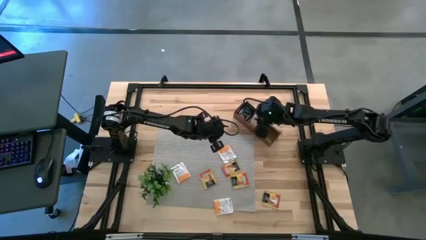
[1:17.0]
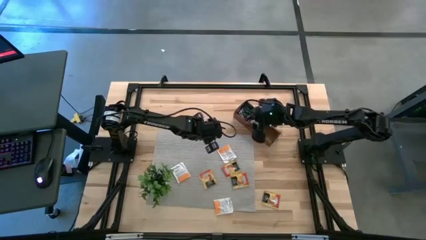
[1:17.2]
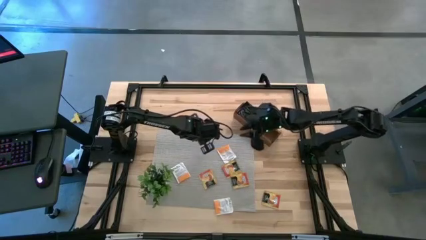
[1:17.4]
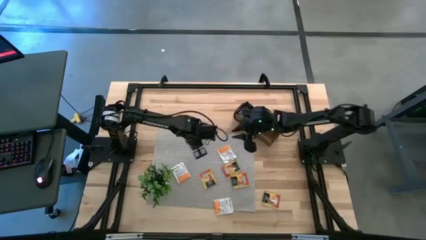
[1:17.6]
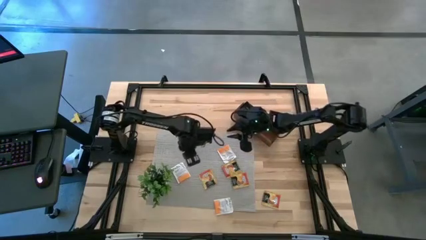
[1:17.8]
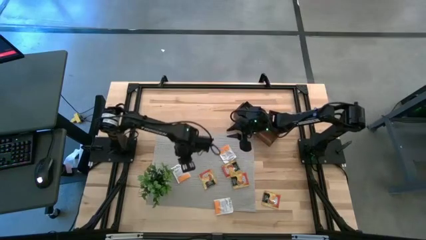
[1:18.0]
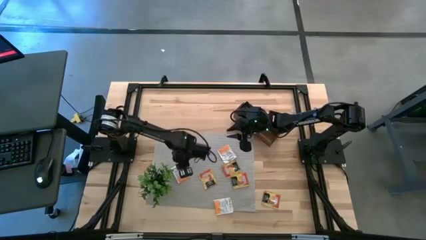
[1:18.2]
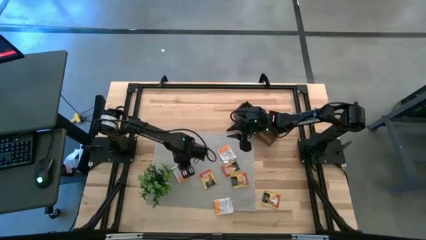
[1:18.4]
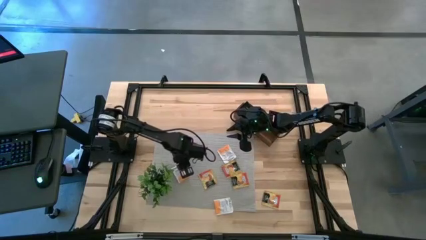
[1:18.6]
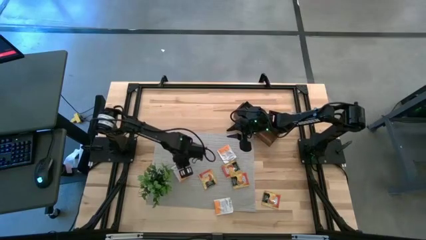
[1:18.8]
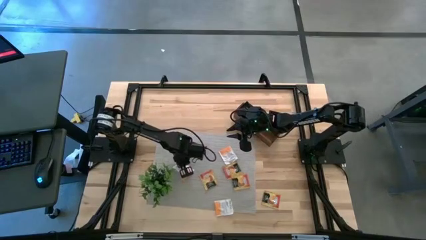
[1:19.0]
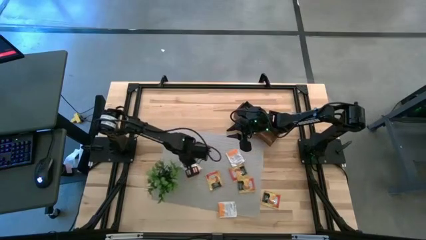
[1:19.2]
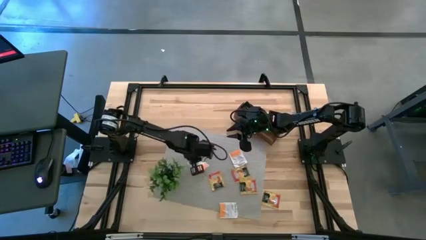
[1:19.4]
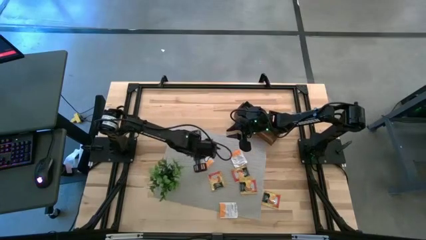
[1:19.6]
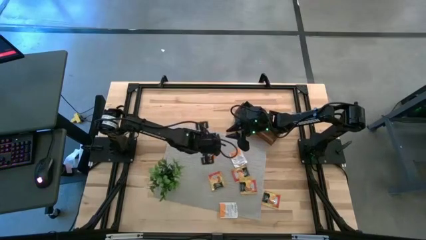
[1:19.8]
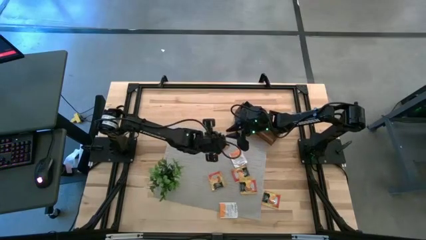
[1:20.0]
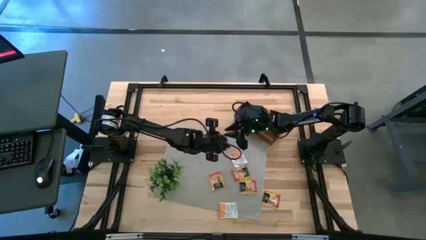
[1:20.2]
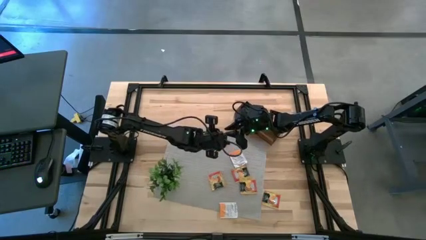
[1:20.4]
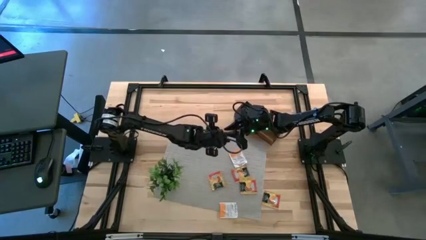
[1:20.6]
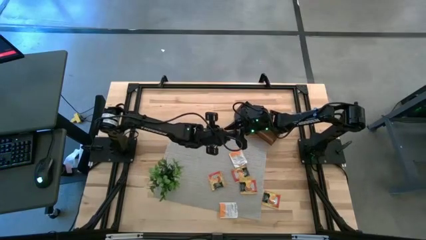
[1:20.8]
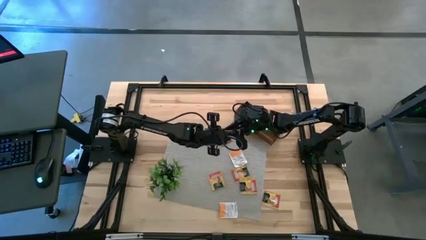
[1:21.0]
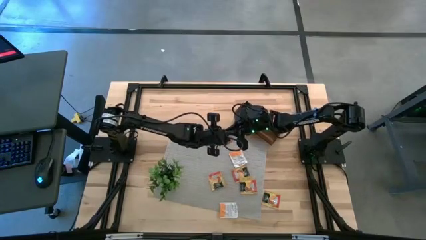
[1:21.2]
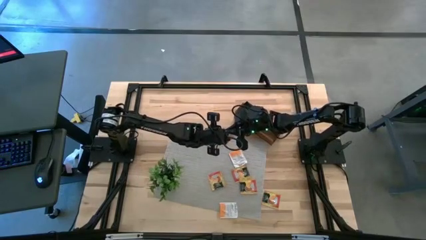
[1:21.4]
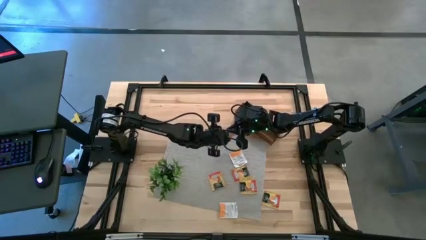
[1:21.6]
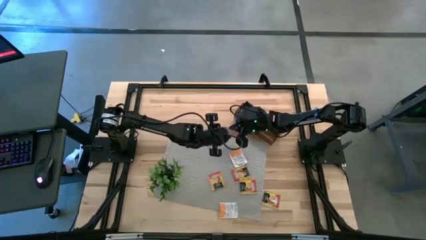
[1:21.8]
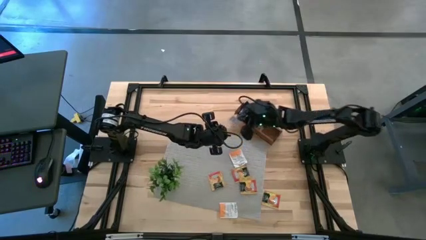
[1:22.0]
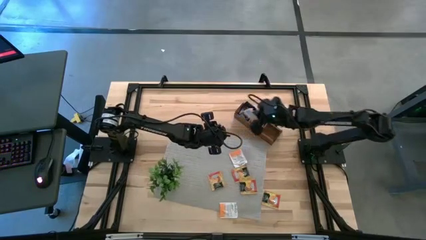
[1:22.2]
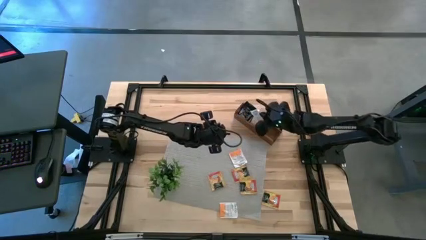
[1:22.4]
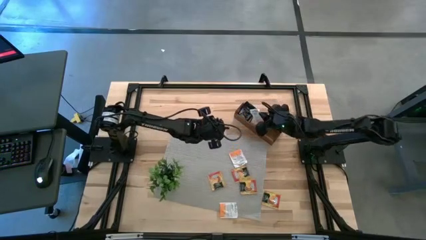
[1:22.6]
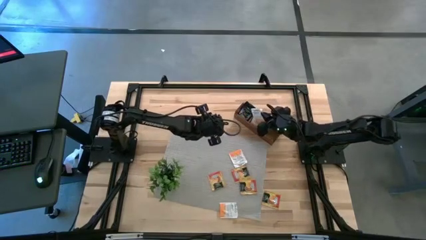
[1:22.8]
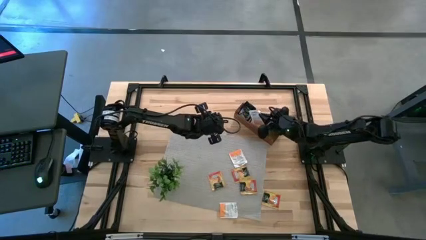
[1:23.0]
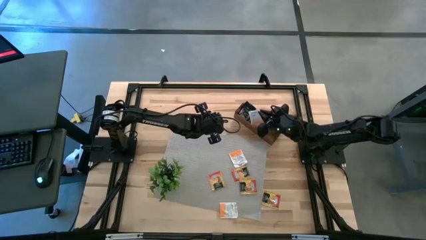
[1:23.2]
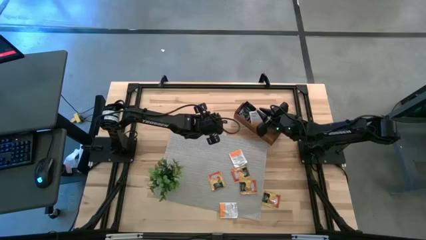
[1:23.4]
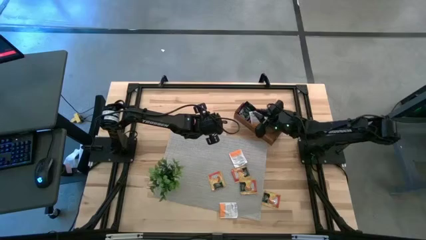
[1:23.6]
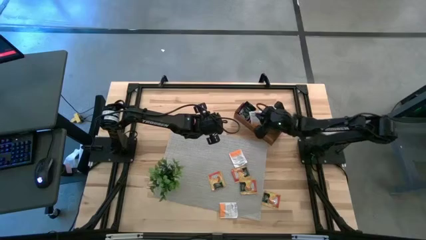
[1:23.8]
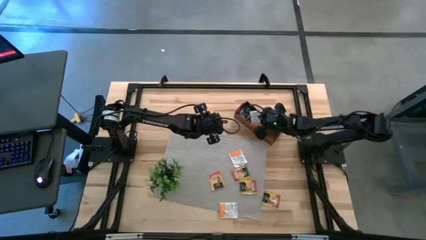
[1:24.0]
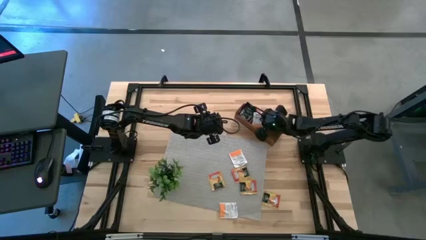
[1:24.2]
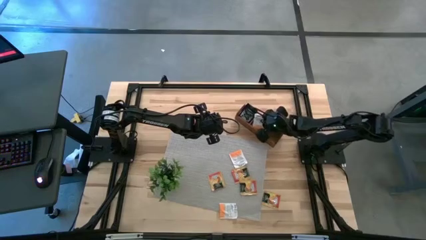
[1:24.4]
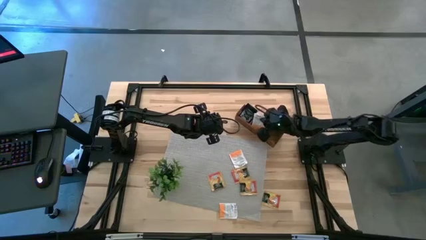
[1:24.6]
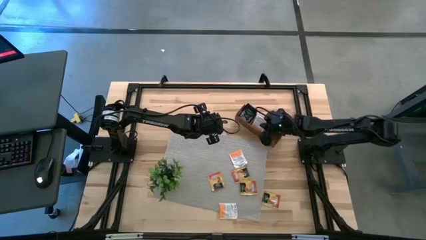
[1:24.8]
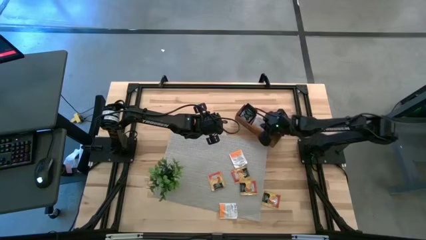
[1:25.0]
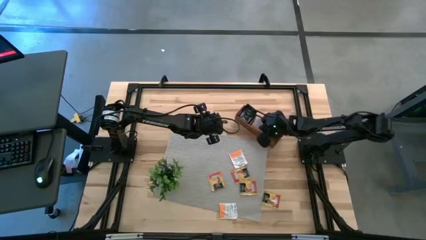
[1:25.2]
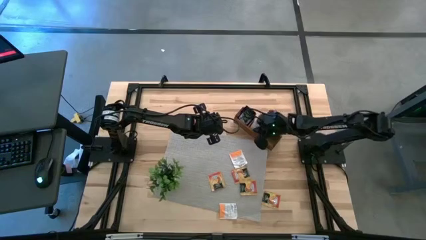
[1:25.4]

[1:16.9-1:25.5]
Task: Pick & Place Tea
Put the orange tea bag into the middle section of the wooden organizer

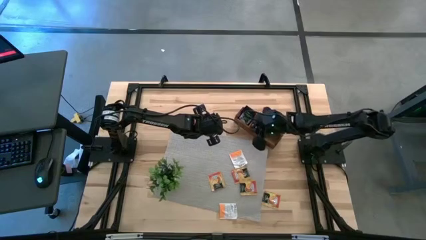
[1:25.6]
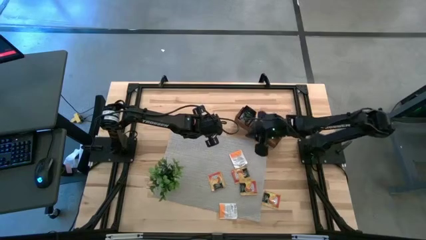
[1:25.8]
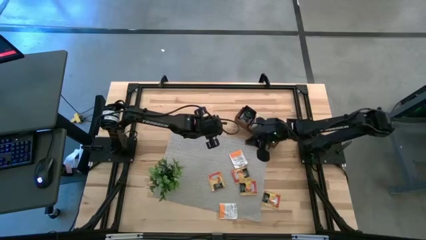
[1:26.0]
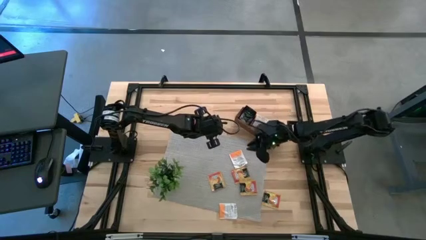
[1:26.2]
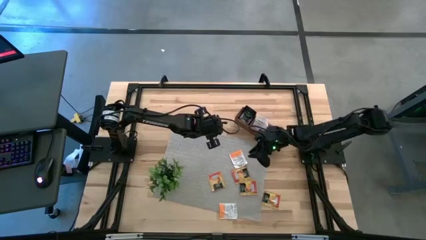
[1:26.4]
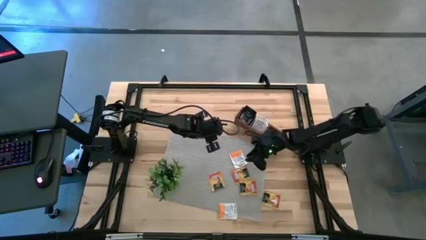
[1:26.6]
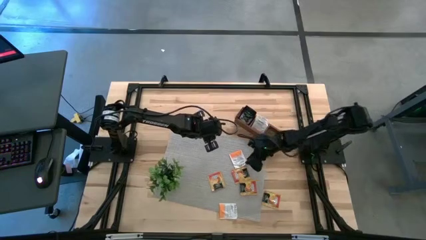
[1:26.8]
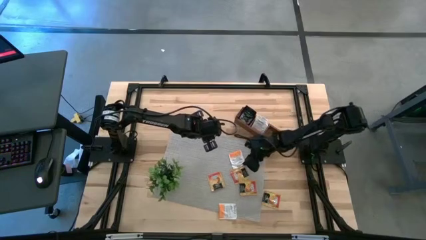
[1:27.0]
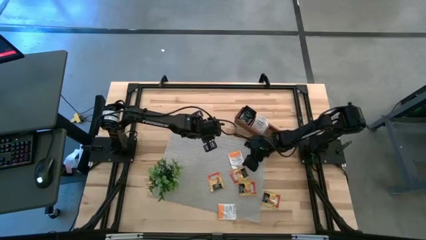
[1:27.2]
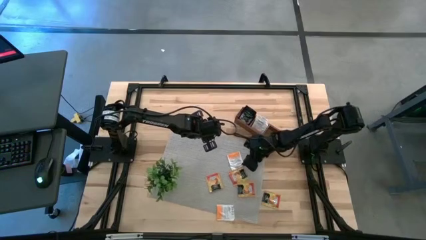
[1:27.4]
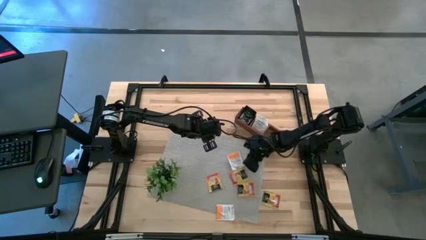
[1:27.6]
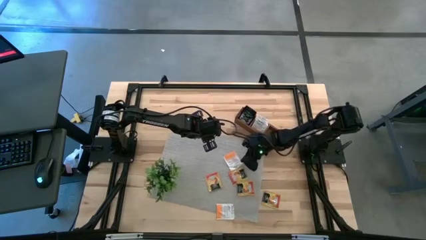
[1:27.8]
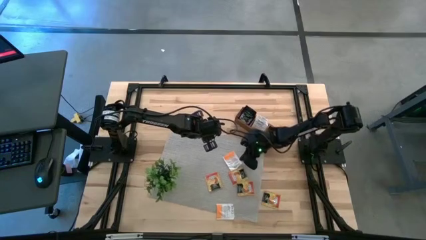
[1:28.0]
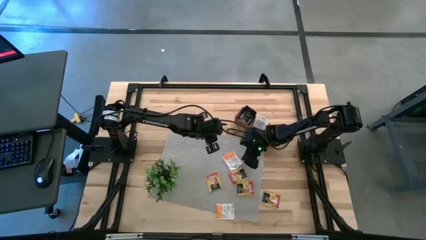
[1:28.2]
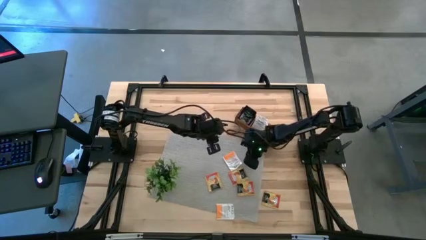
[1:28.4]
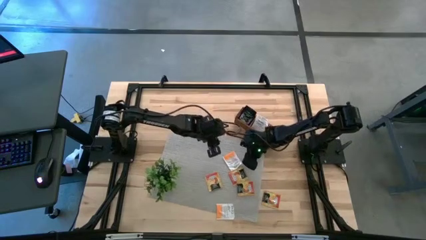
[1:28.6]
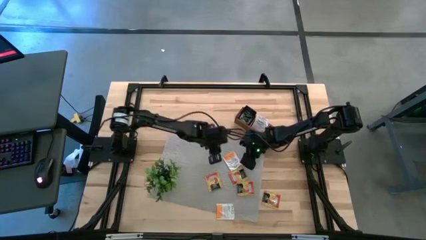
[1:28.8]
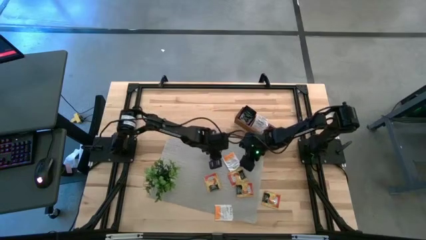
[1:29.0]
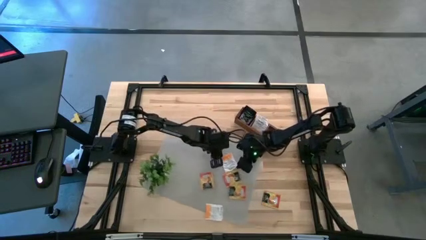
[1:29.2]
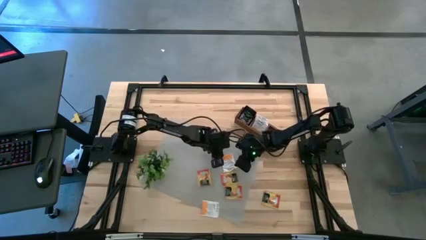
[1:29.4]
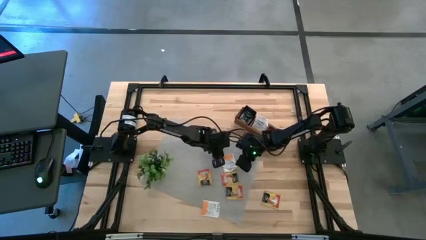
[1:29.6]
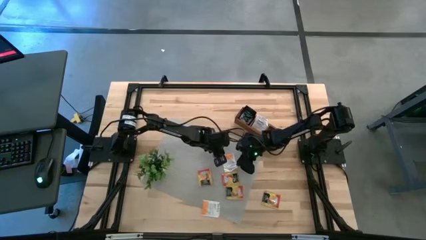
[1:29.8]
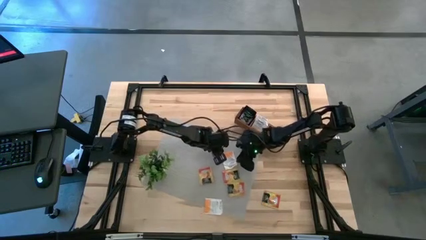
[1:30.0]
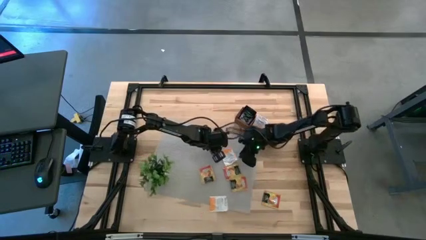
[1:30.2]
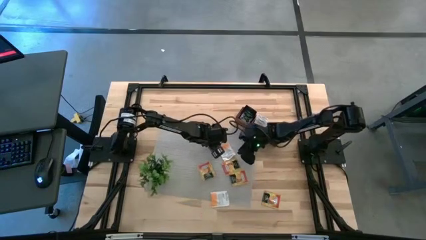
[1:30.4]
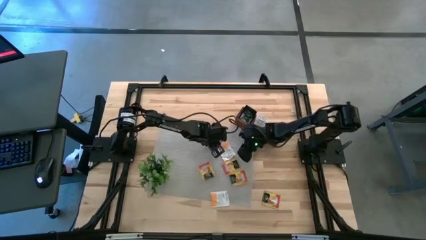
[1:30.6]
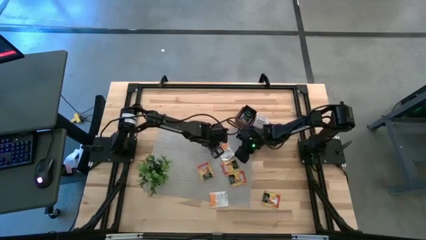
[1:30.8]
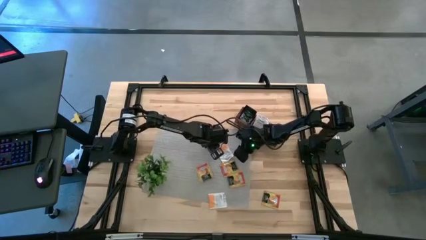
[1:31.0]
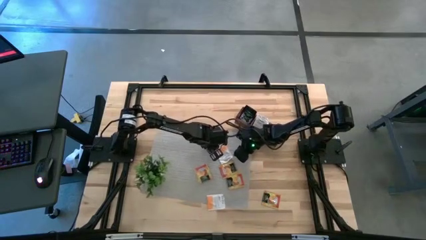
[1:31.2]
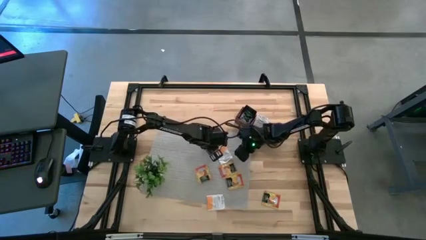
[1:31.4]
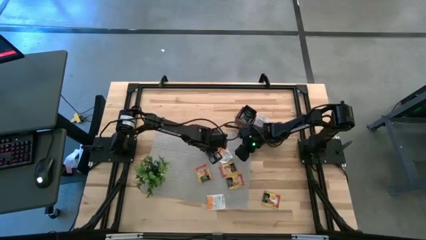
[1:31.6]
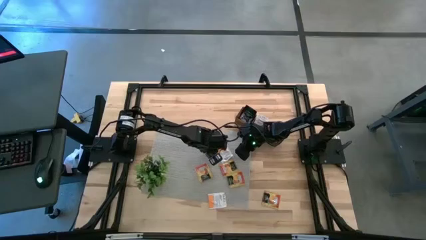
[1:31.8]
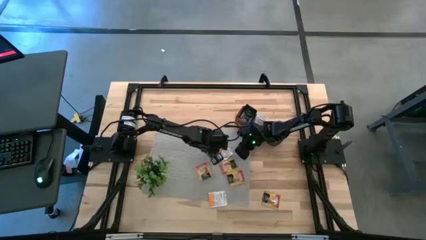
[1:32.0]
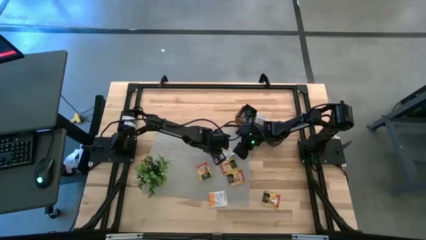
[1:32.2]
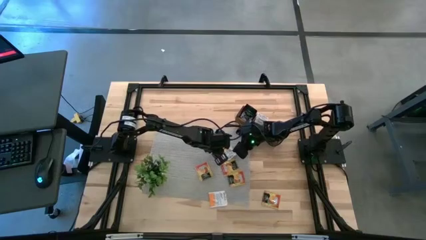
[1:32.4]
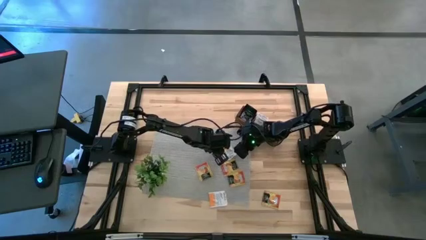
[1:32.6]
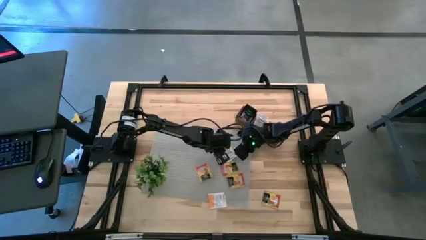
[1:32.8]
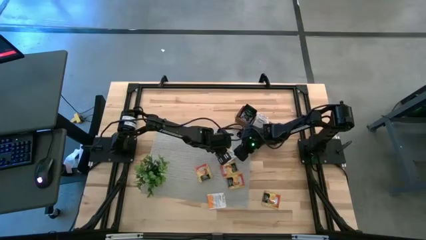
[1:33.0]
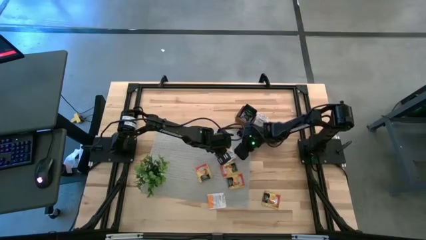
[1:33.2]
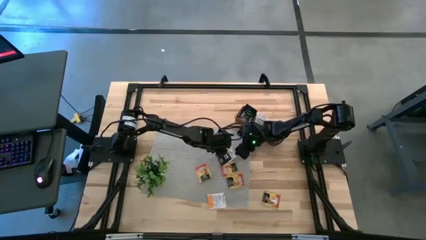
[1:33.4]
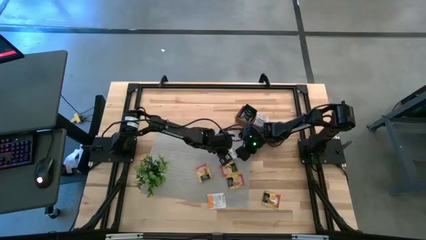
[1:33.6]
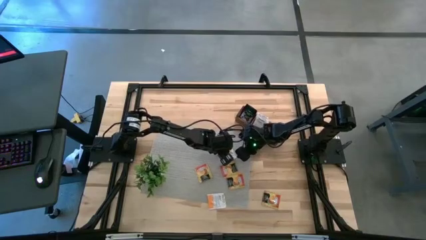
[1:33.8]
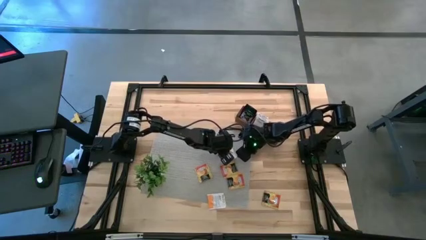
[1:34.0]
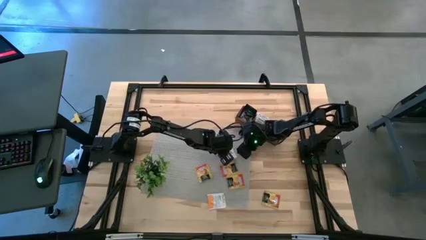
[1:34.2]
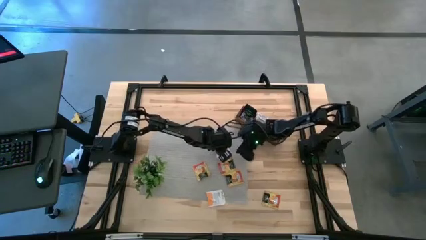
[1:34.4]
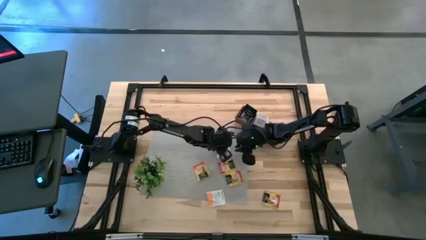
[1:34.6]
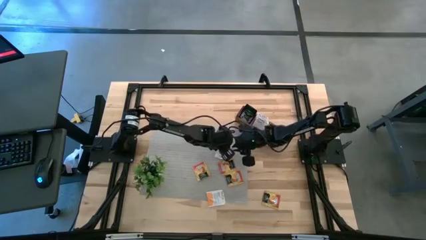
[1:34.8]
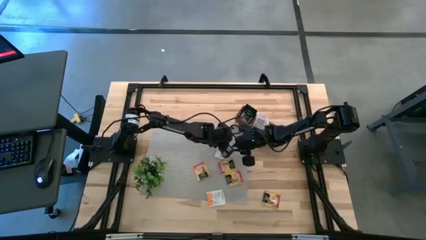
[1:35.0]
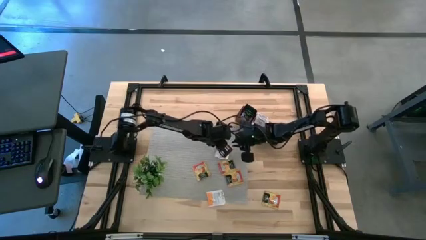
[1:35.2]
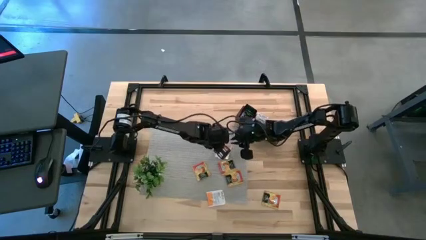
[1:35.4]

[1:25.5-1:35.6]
Put the orange tea bag into the middle section of the wooden organizer
